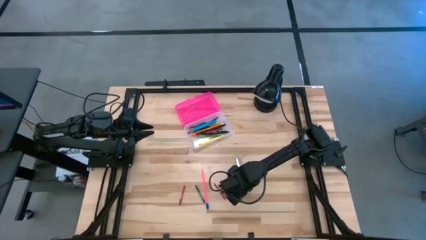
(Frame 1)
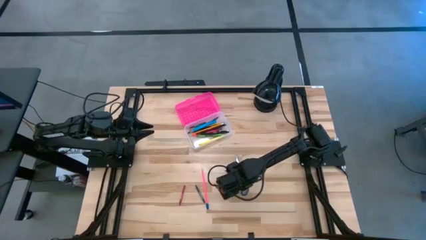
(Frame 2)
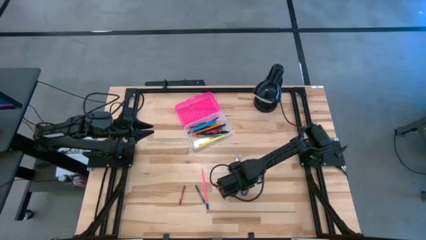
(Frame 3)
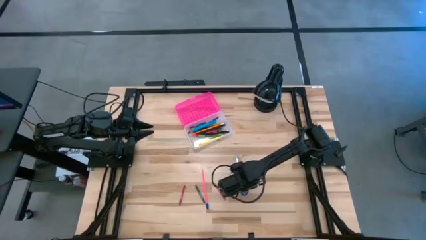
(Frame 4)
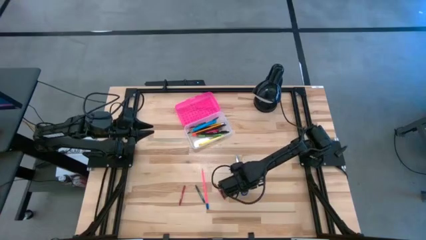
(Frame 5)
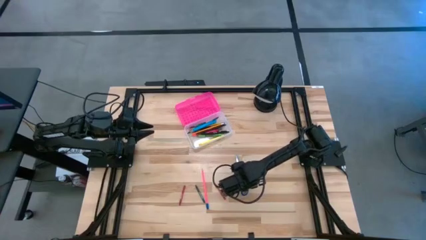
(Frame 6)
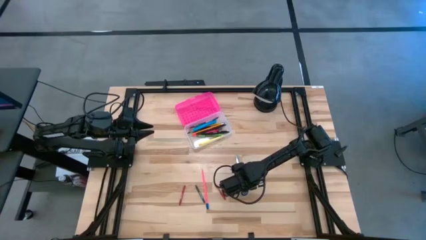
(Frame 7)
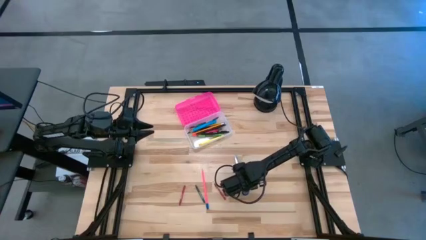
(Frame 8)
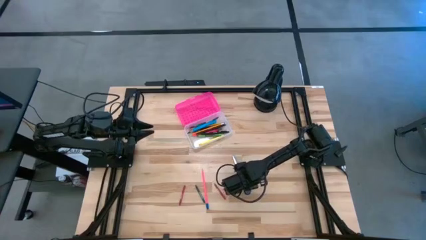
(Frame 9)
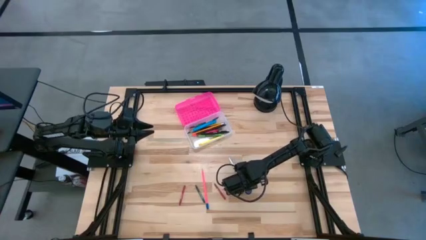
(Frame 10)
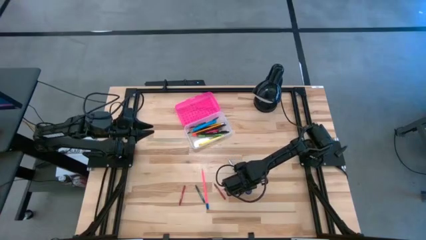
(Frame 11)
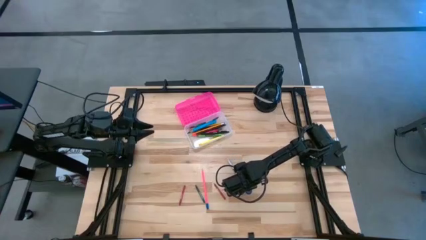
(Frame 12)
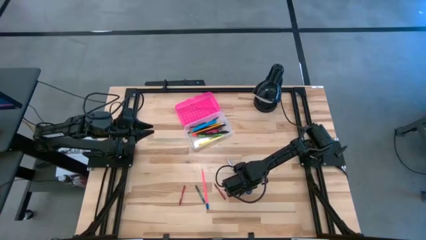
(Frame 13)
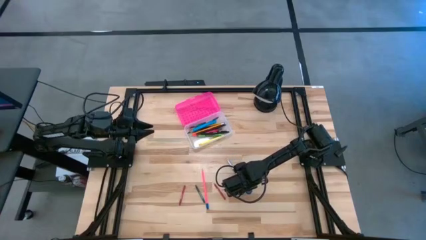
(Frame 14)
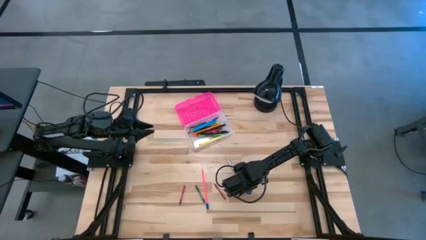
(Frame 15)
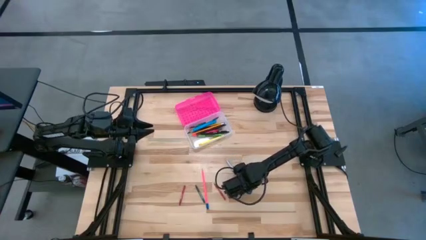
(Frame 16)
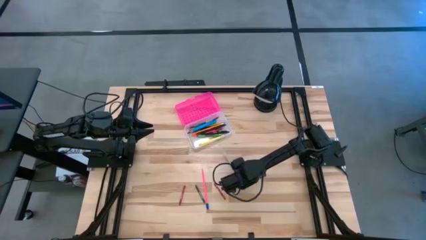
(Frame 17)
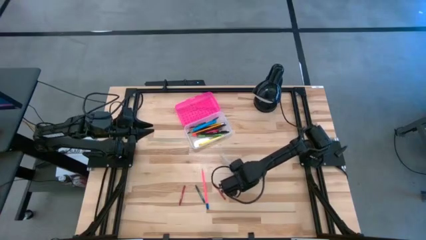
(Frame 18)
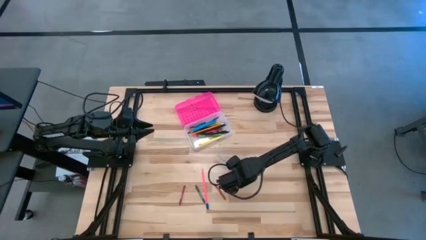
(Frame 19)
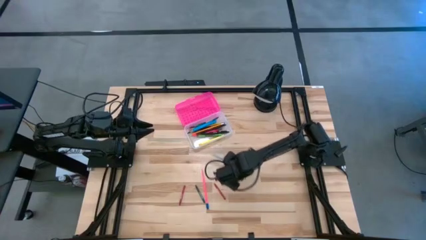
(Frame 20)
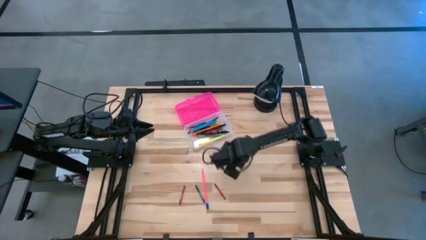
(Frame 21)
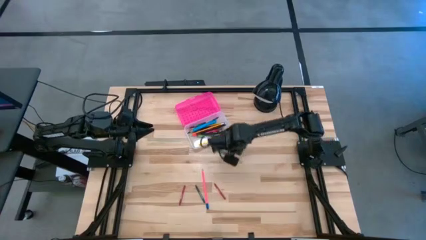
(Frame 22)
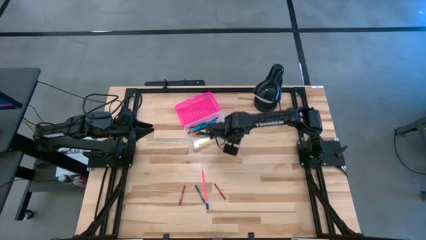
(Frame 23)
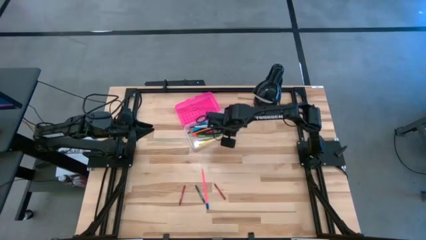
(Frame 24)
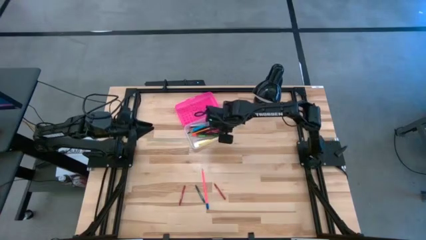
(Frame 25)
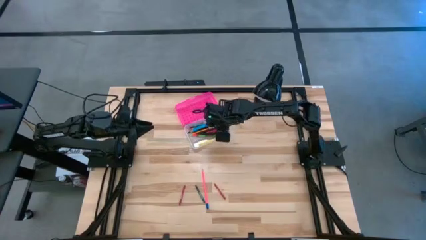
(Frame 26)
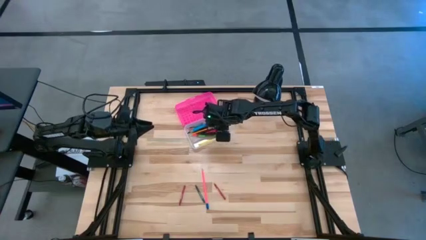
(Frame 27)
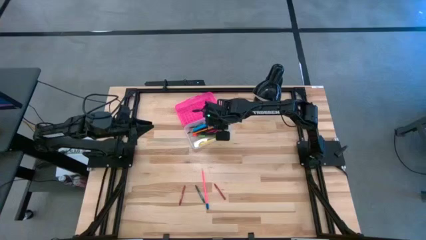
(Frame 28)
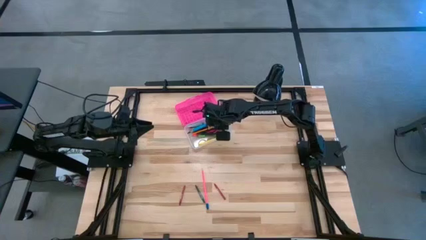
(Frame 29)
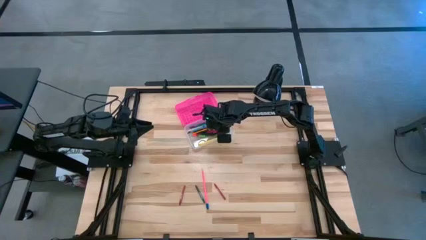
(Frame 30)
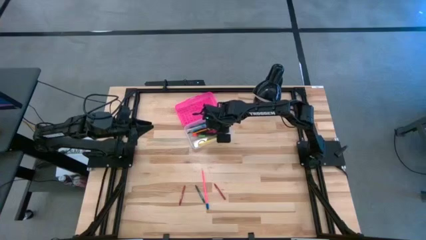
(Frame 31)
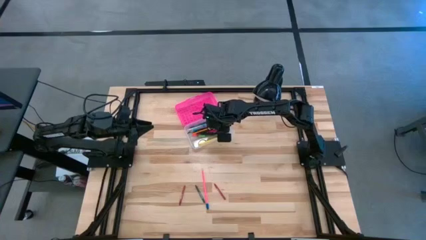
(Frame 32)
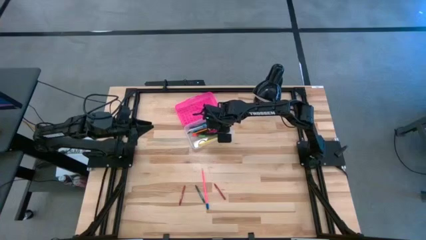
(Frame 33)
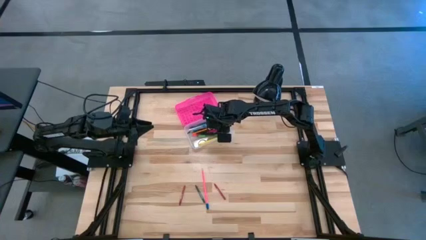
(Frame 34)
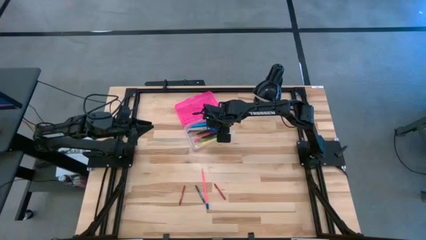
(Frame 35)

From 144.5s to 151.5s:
Task: Pick & place school supplies into a supply box
Put the blue scissors into the pink supply box

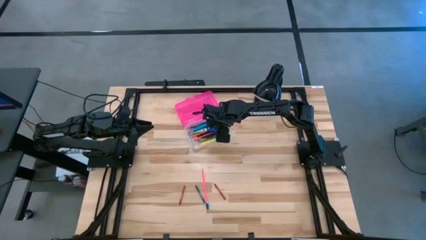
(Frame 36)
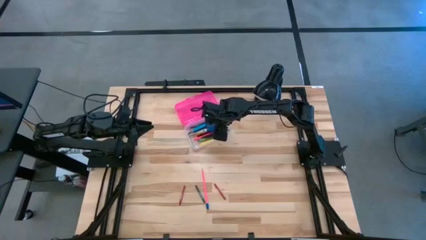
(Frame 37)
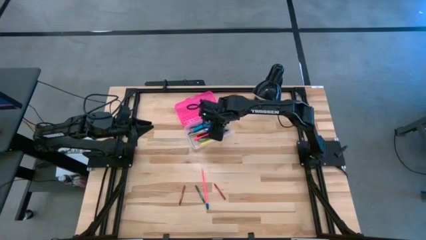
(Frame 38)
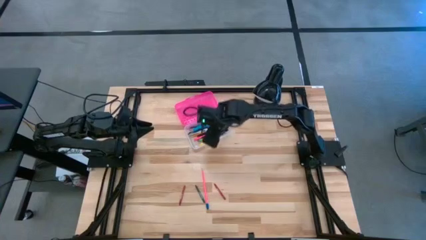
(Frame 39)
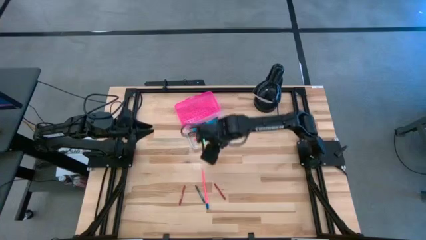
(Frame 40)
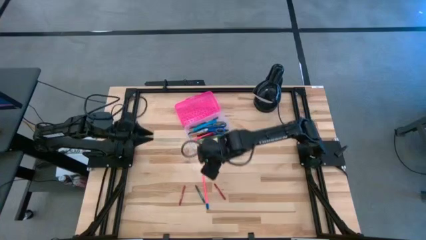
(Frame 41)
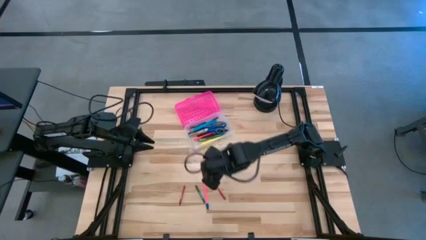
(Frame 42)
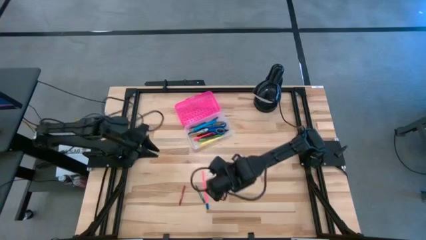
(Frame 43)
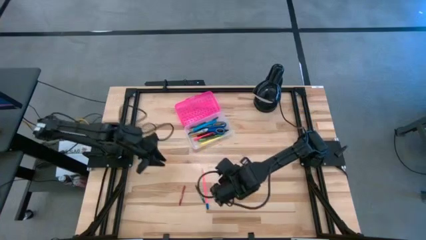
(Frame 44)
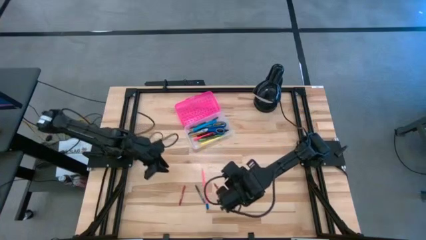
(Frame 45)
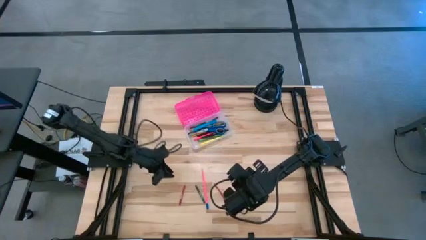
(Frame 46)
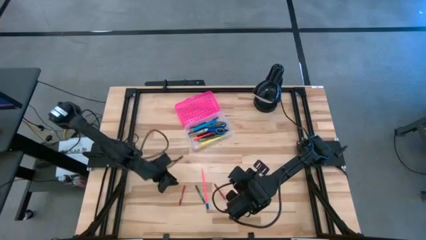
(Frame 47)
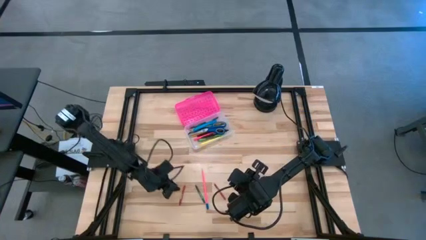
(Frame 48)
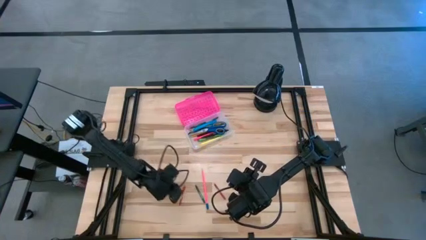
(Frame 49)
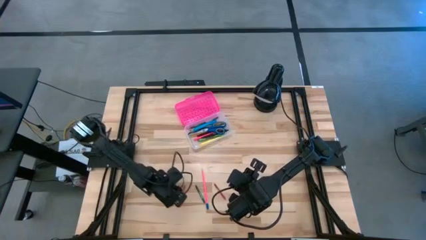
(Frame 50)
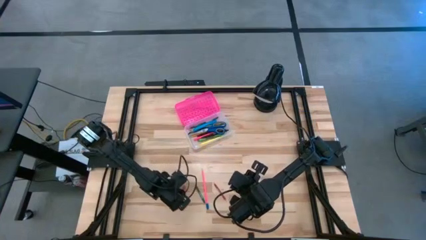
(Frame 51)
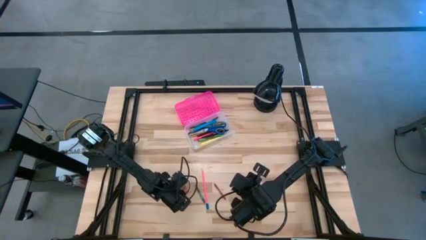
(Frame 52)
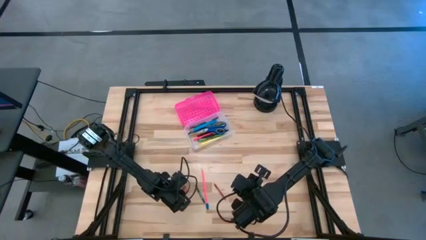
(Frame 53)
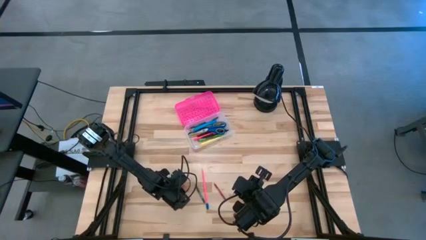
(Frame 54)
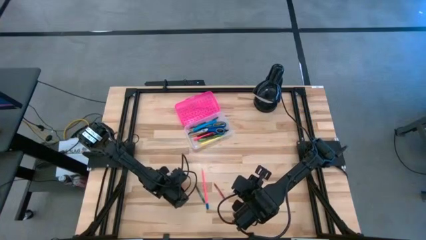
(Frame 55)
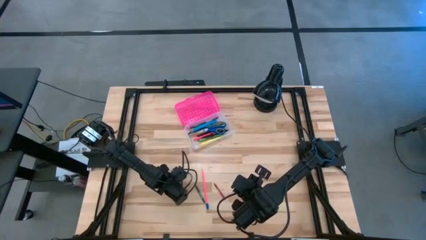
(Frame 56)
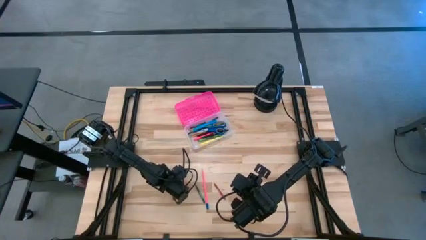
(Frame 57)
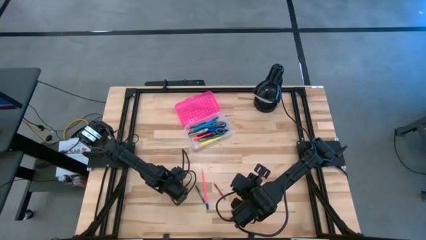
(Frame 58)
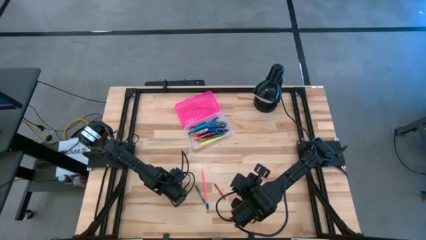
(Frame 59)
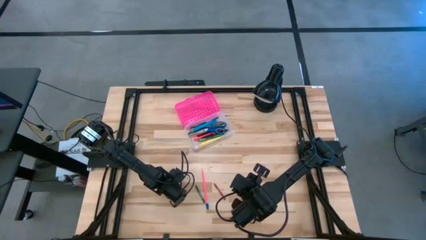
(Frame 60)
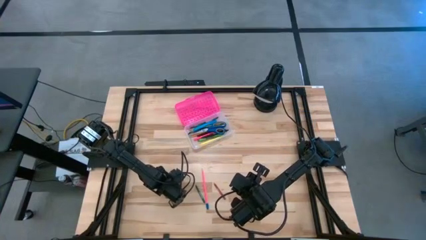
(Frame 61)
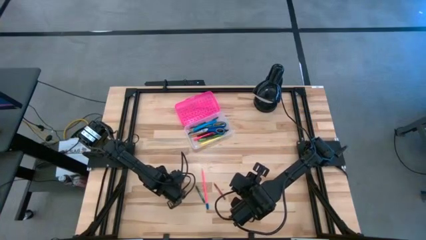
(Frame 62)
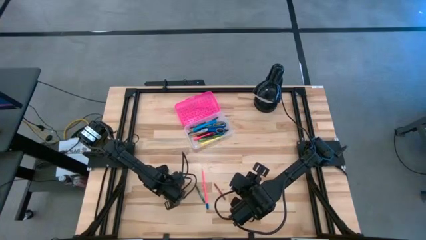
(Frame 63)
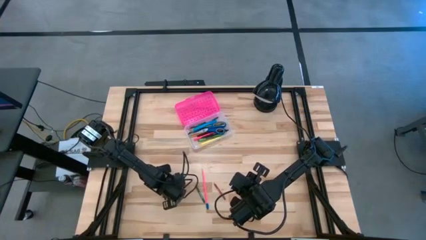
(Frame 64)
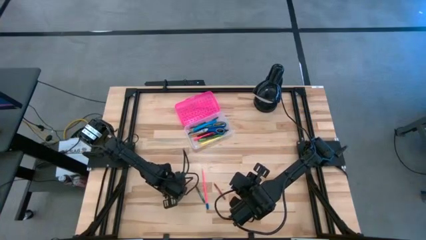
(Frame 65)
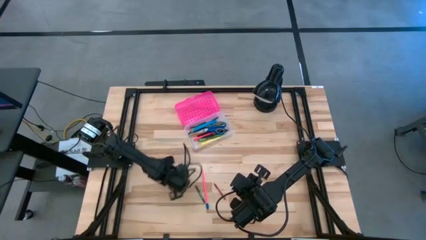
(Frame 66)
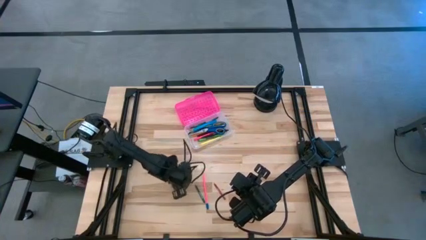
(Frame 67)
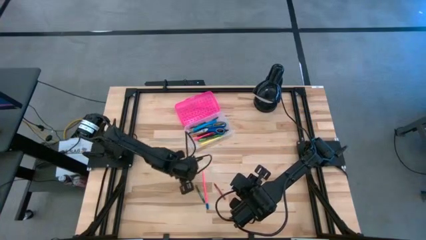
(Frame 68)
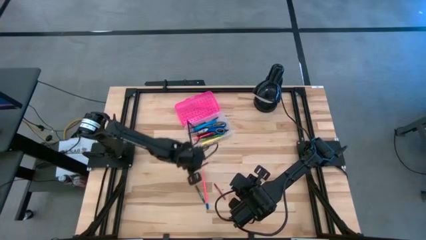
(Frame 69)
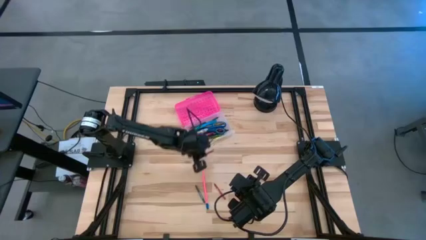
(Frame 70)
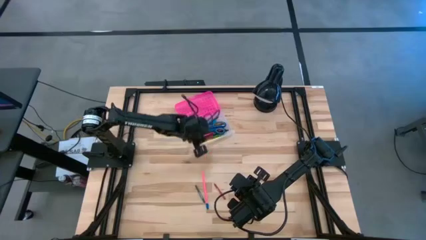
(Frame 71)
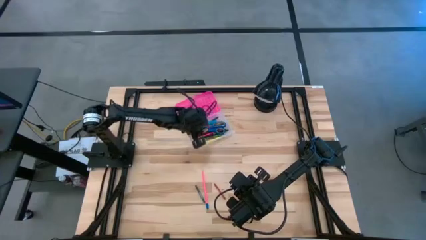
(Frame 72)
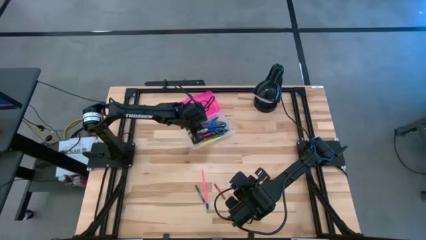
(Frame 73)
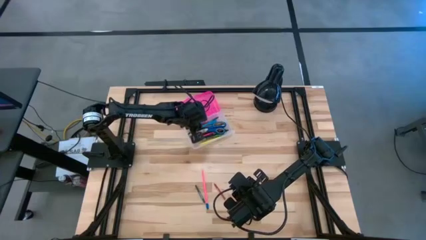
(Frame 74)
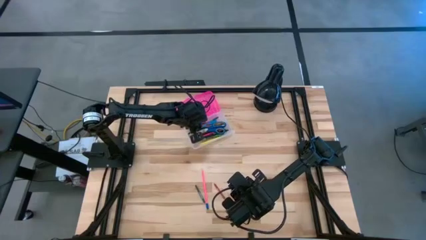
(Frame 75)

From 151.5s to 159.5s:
Put the red crayon into the pink supply box
